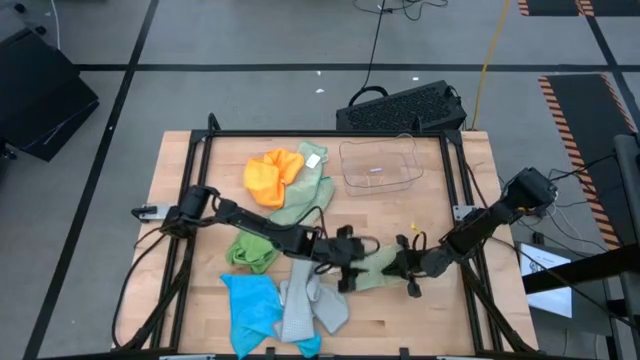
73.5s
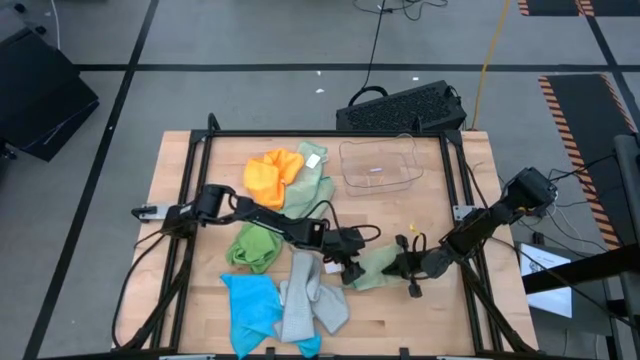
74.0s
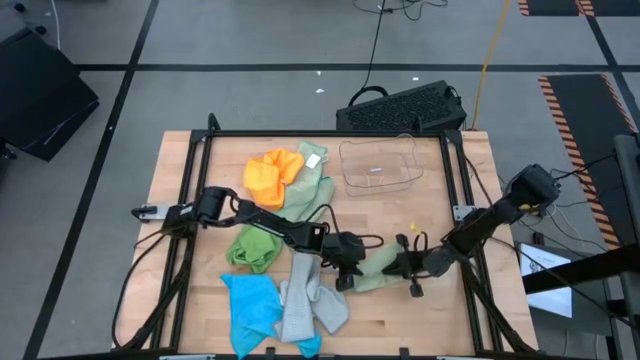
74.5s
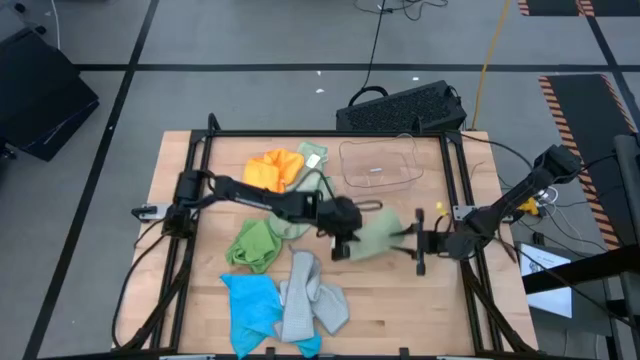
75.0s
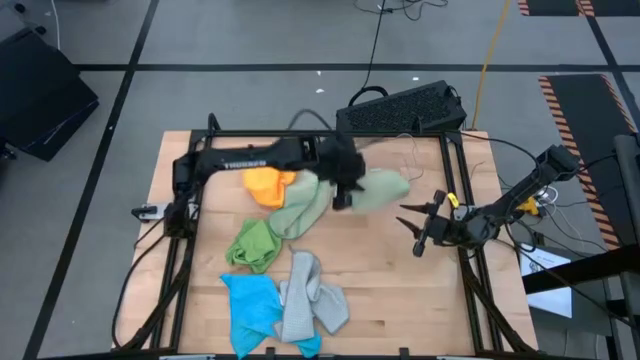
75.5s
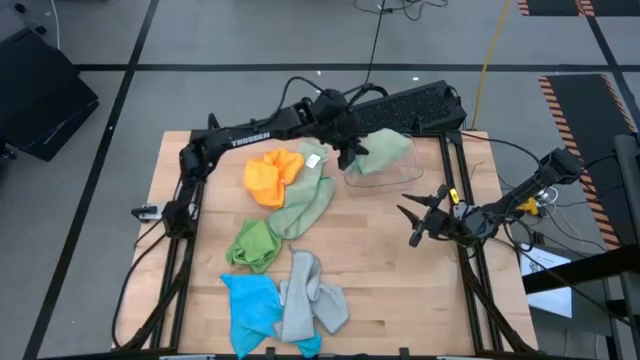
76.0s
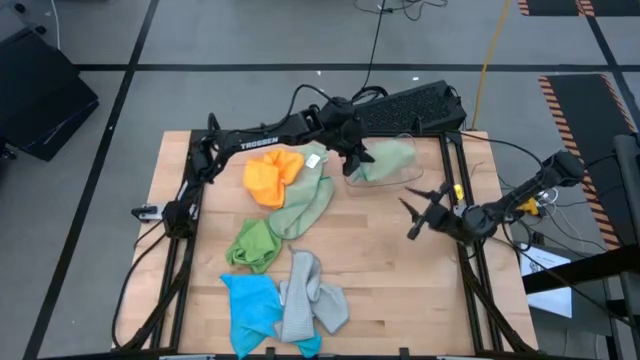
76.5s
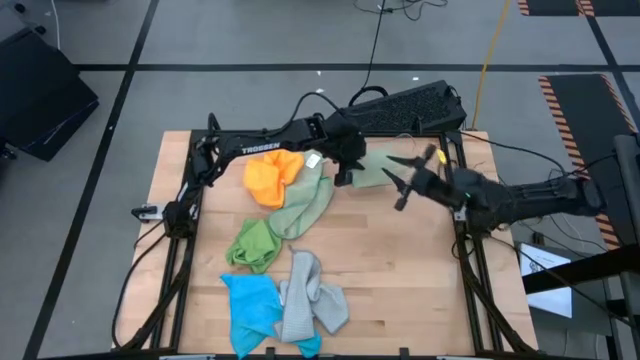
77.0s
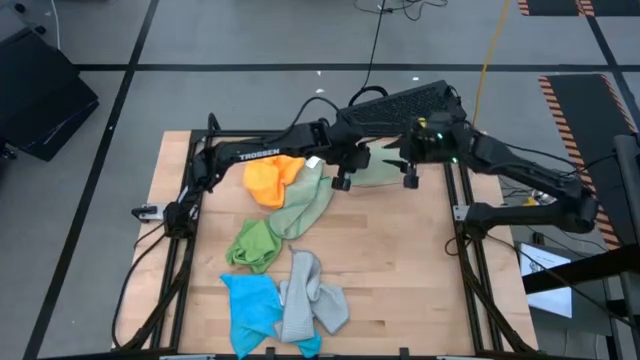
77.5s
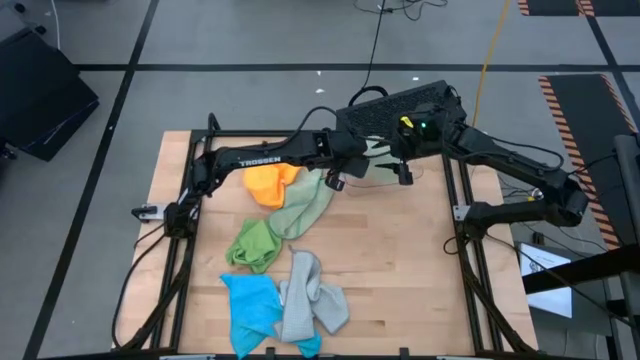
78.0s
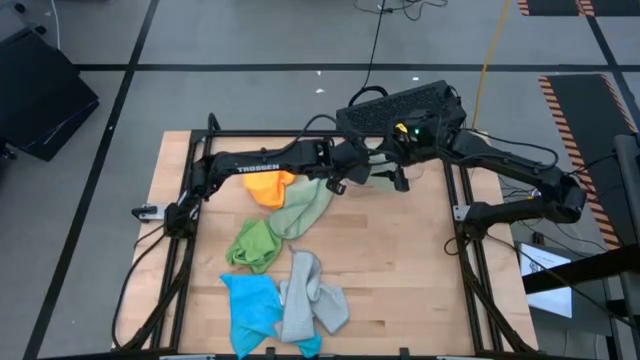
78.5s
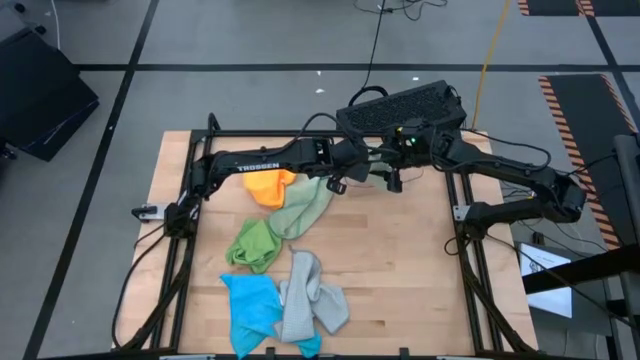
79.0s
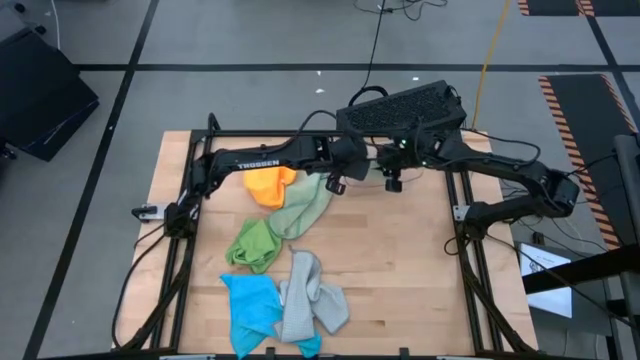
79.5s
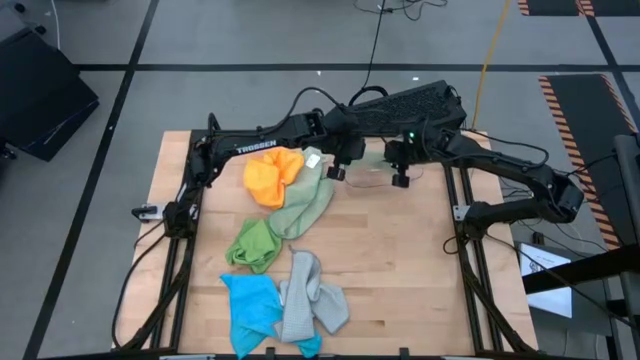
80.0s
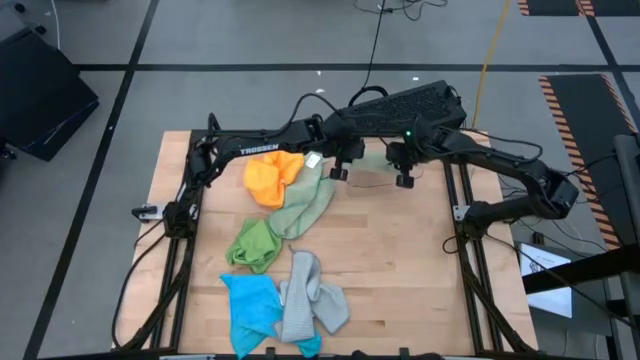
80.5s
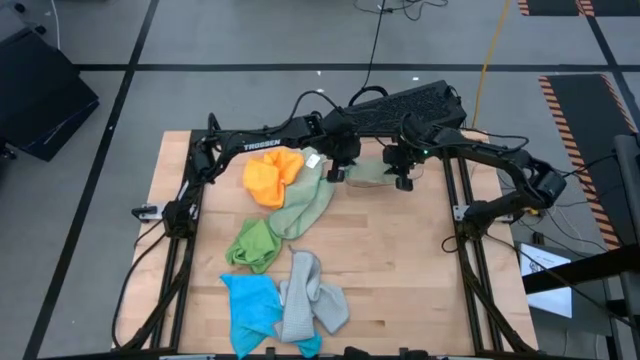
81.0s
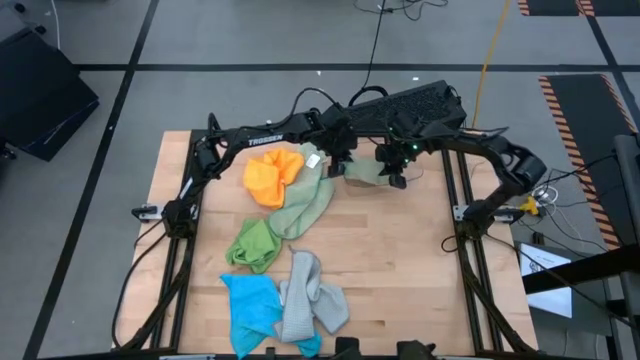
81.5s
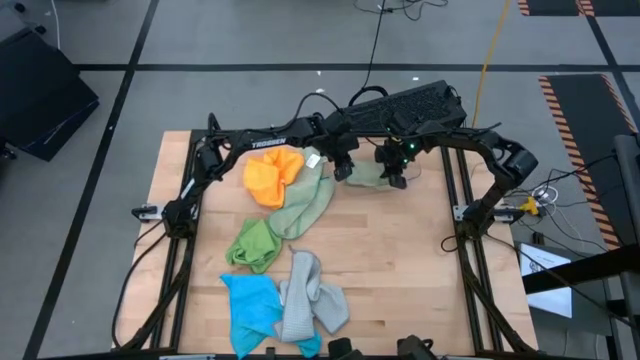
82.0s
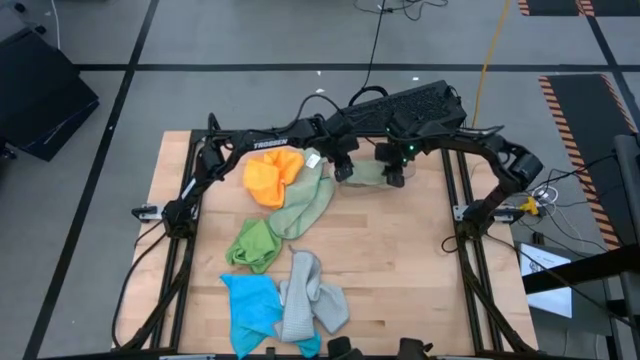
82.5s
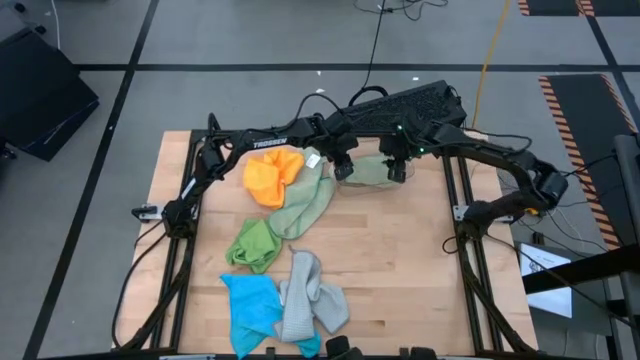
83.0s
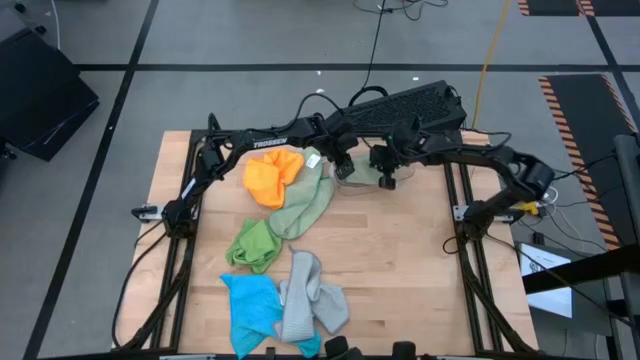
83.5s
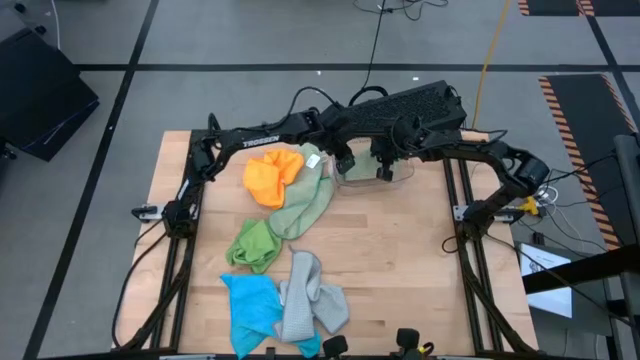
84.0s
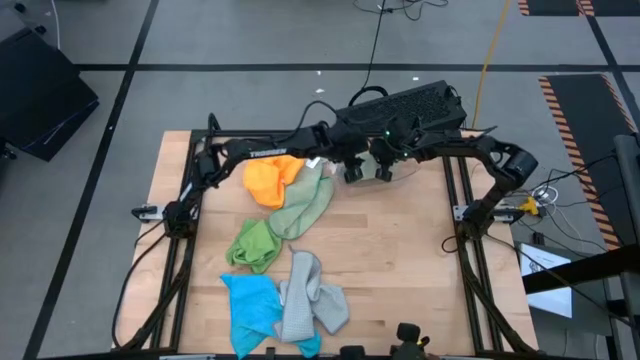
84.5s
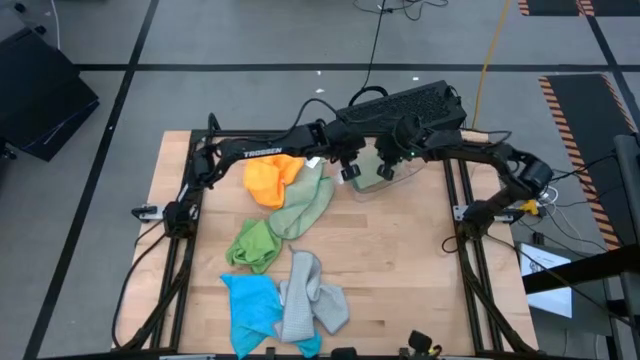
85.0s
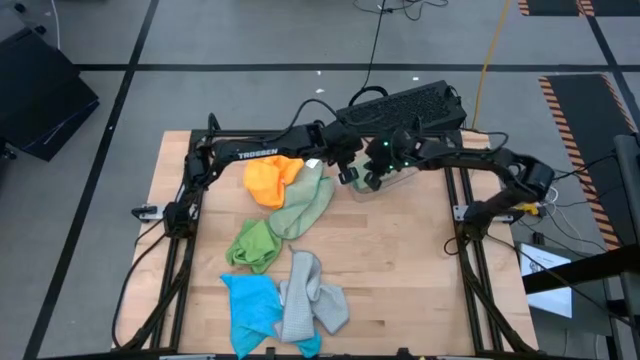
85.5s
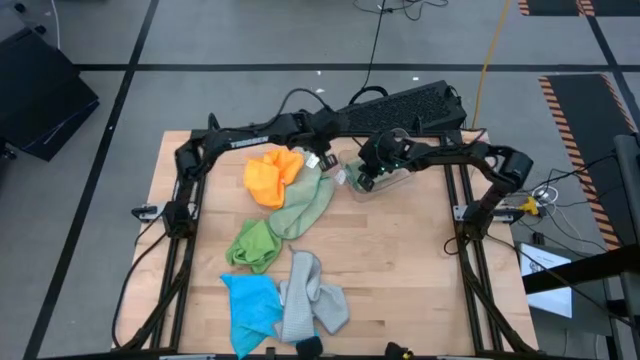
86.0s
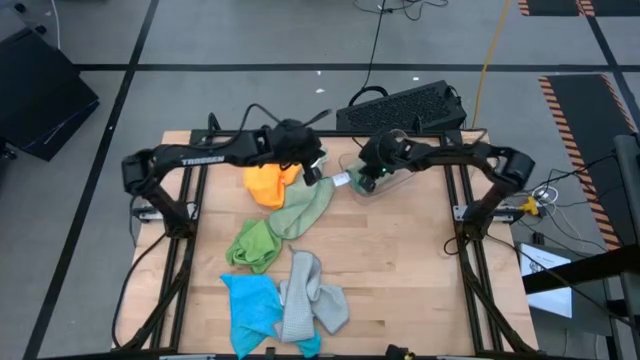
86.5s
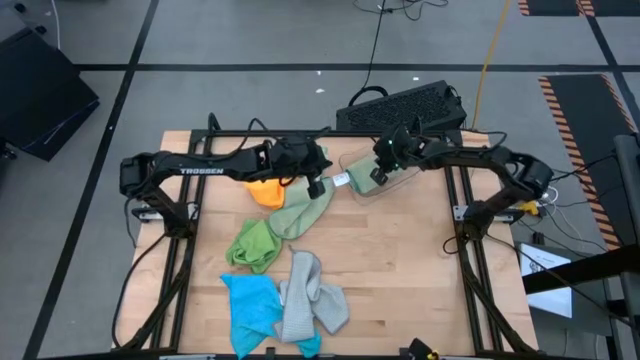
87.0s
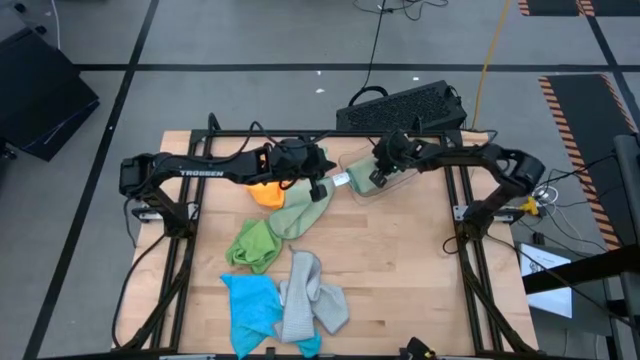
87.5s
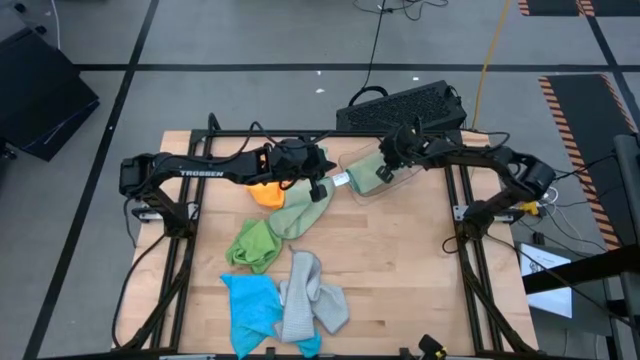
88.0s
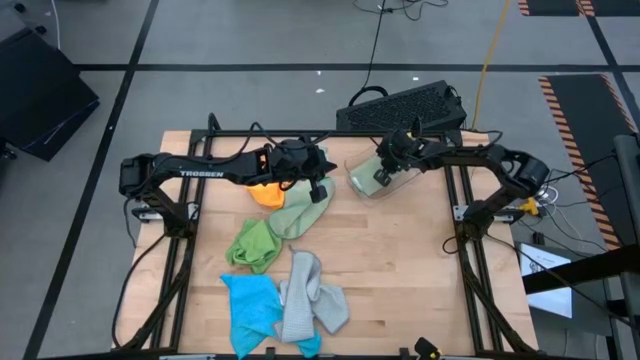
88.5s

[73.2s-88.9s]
Task: Fold microfiber towels
Put the folded light green microfiber towel into the transparent bin

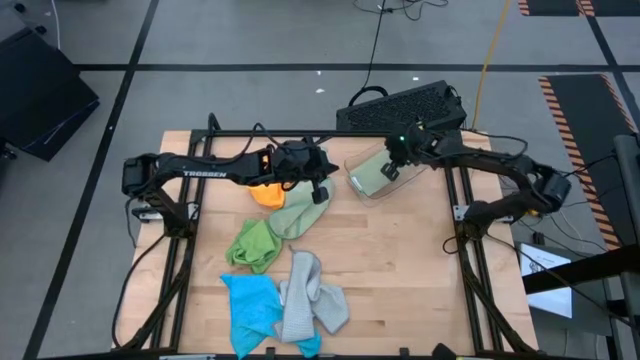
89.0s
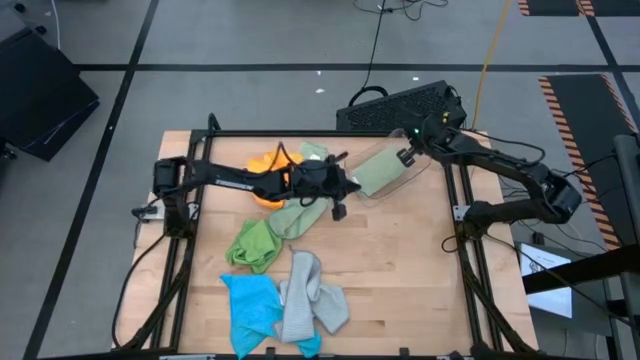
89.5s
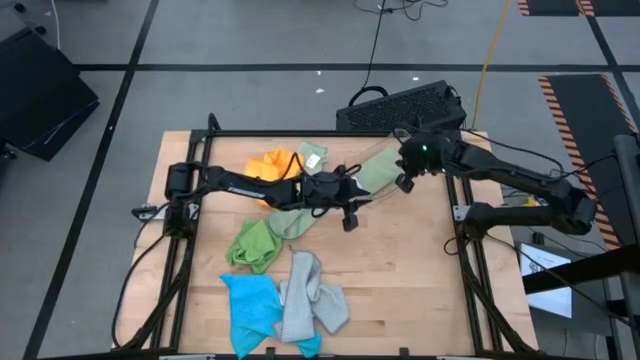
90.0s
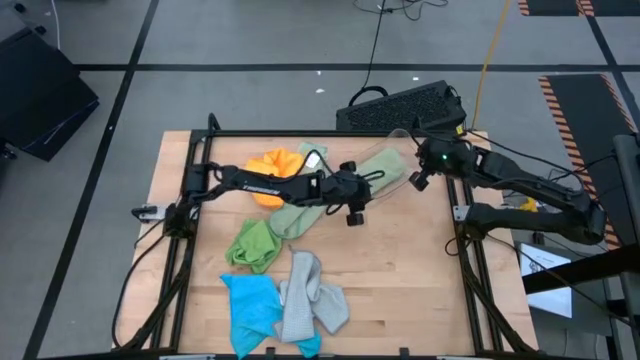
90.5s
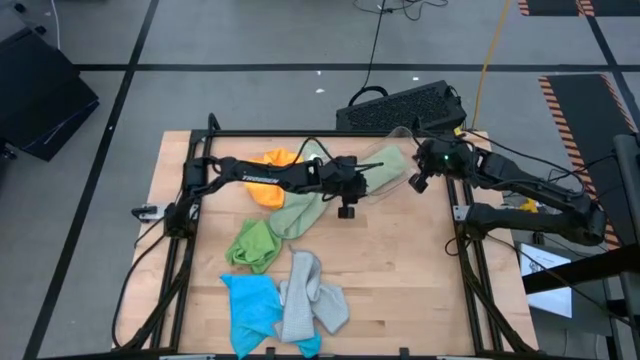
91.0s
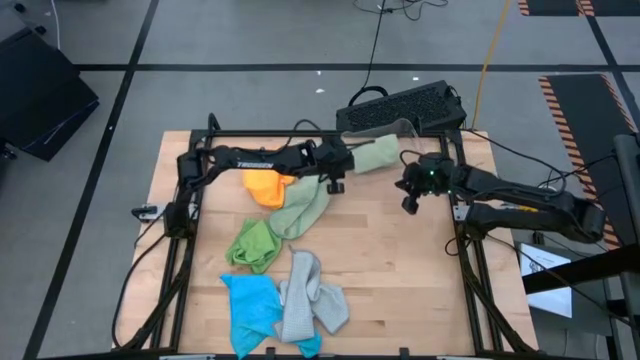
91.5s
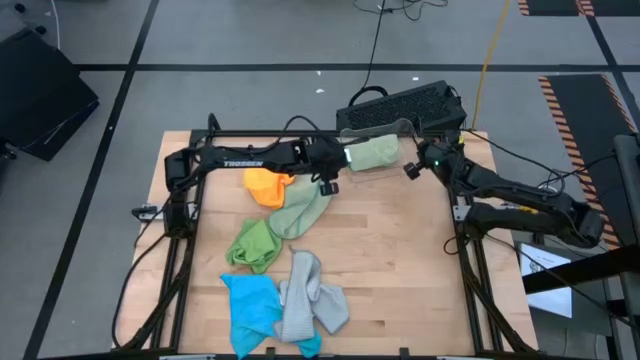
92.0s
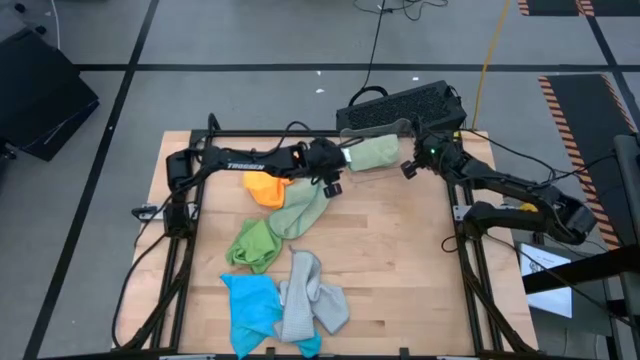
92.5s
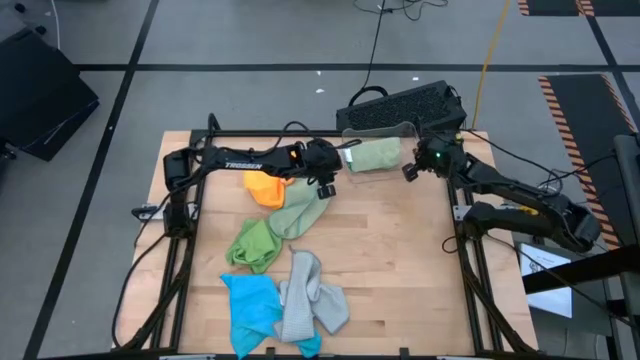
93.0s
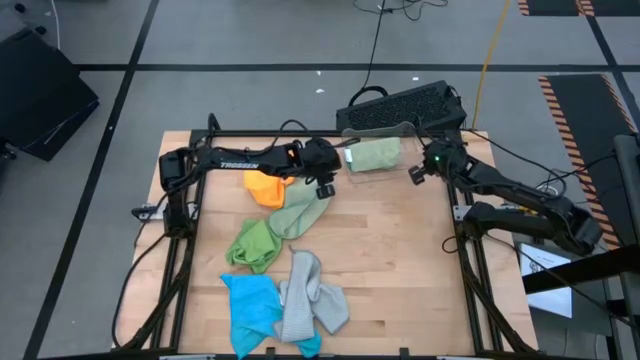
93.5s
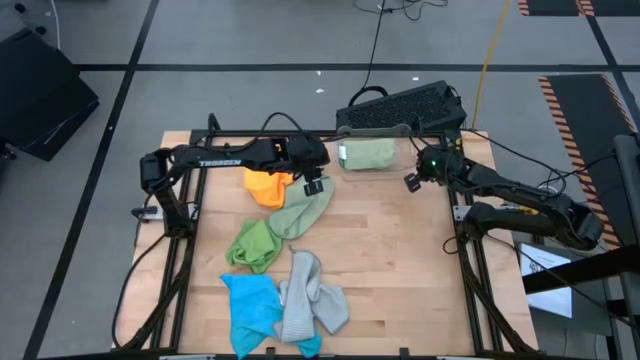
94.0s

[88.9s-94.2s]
Adjust the transparent bin
